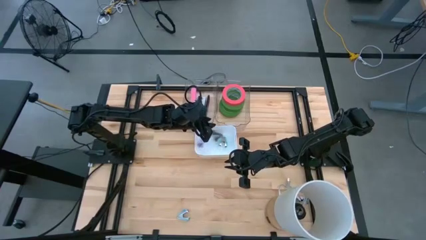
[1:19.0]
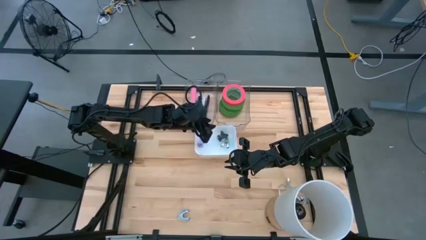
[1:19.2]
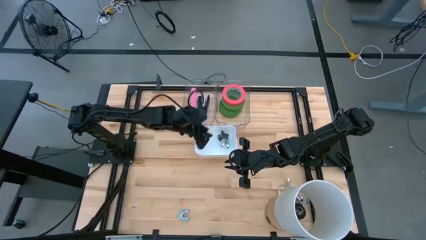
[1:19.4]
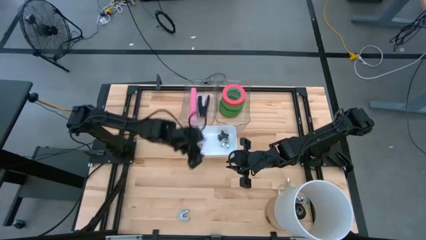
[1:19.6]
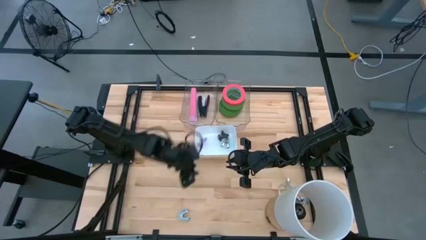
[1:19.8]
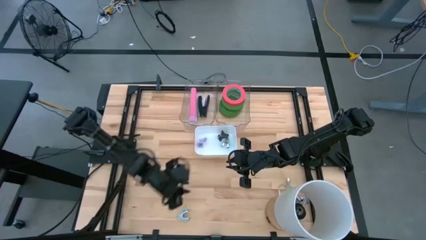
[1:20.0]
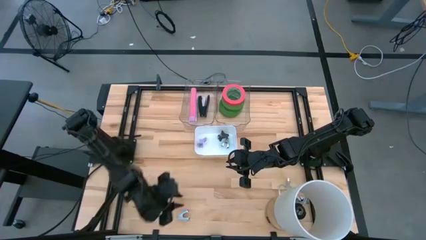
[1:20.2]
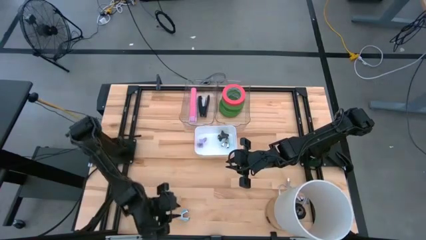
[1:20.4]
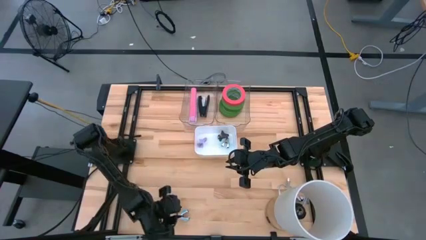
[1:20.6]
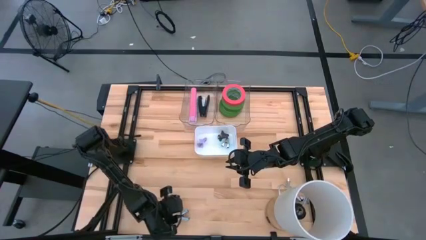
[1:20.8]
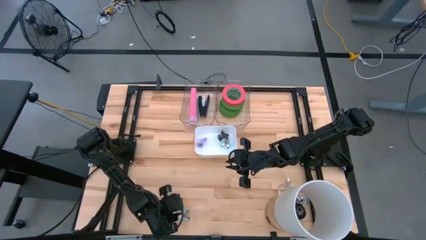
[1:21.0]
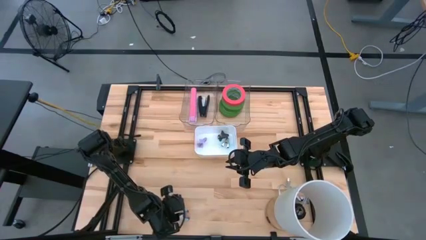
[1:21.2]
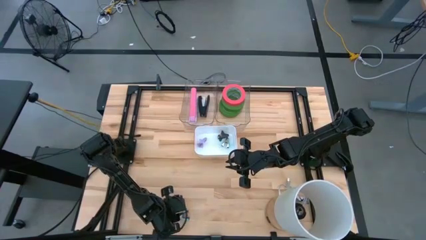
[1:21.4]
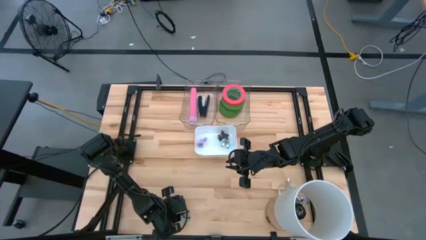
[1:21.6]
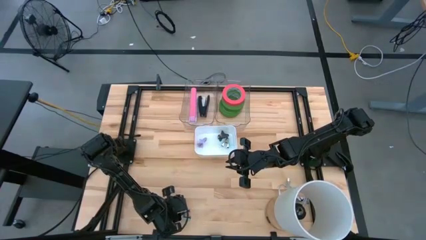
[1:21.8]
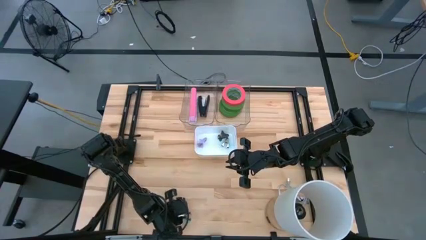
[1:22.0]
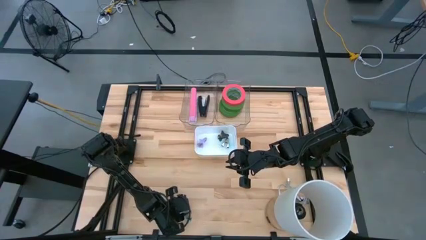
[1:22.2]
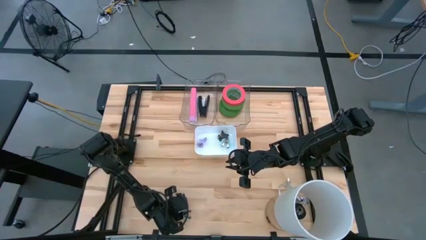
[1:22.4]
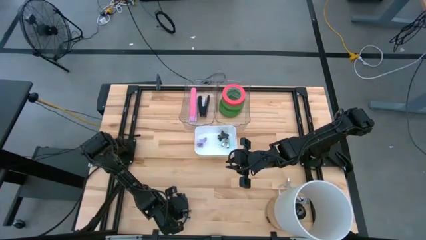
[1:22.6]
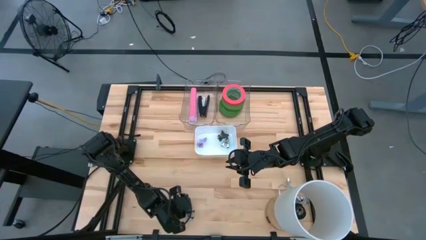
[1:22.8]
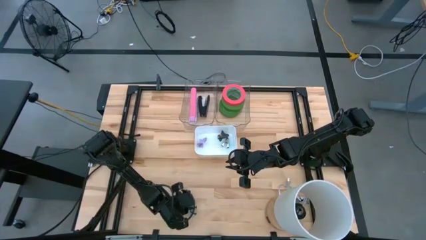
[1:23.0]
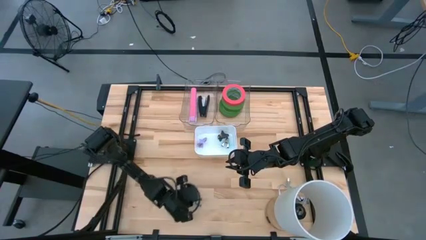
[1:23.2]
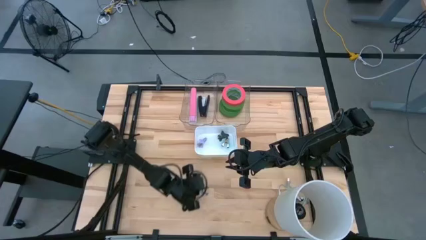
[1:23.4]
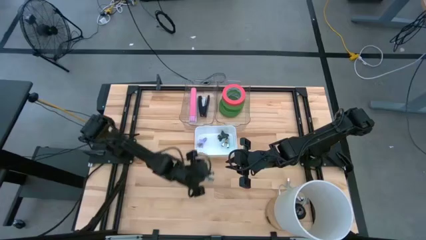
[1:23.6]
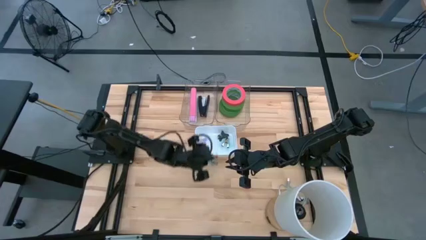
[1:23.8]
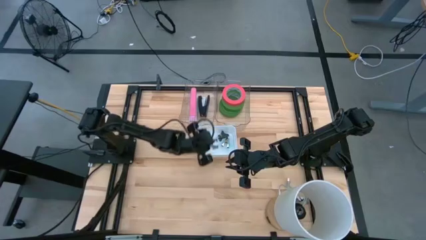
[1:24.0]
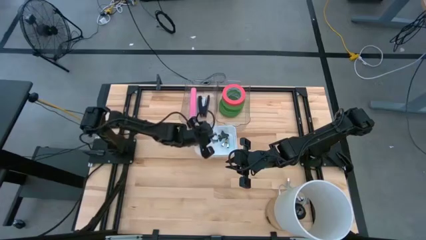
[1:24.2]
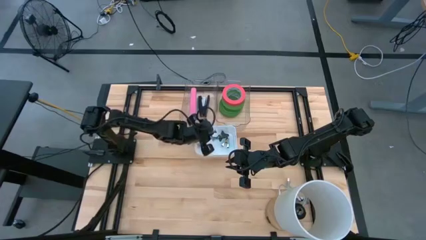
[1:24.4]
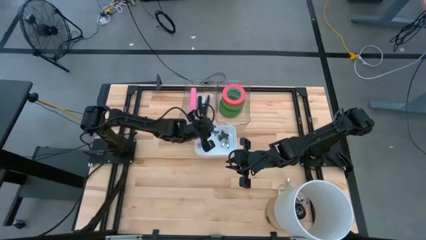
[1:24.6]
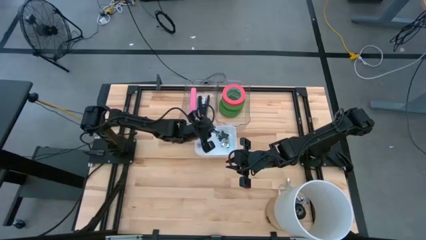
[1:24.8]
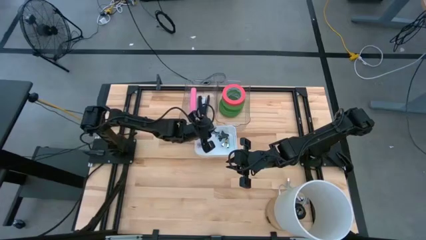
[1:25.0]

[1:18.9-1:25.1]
Task: Pick and place Stapler, Stapler remover, tape
Put the blue staple remover into the white bin

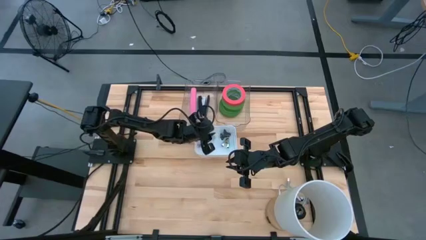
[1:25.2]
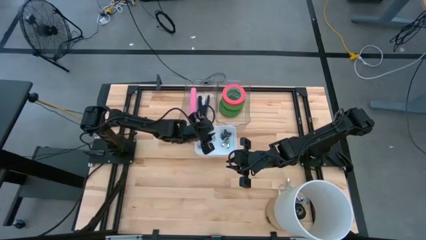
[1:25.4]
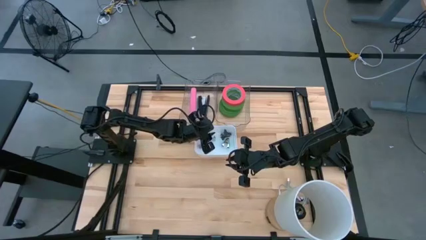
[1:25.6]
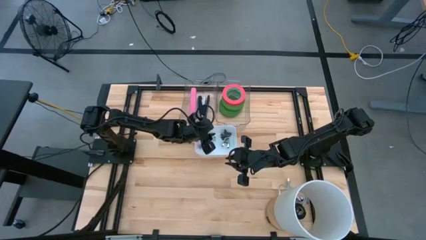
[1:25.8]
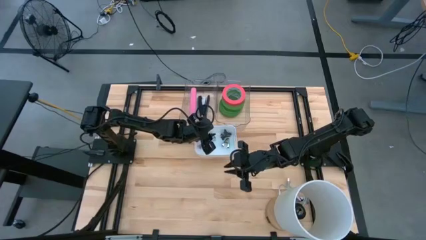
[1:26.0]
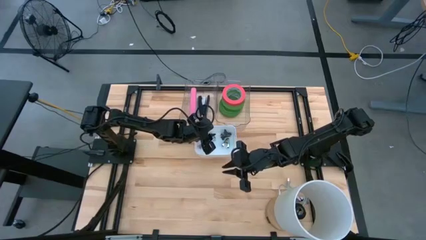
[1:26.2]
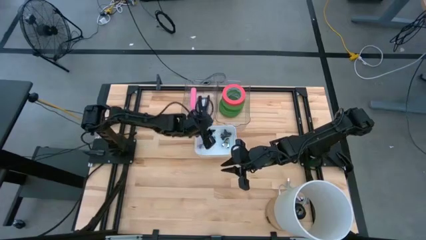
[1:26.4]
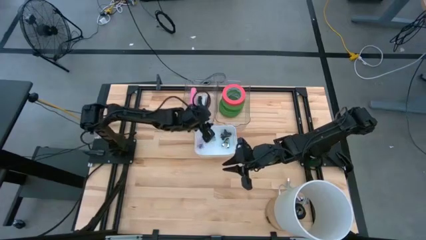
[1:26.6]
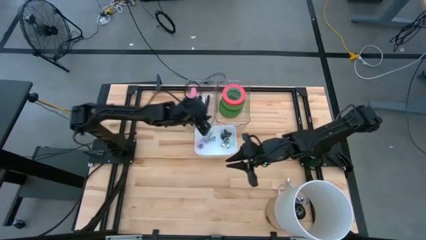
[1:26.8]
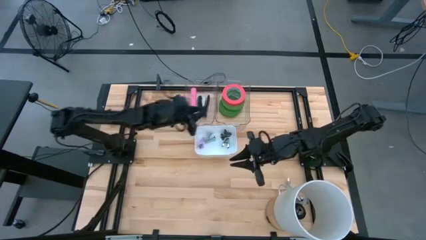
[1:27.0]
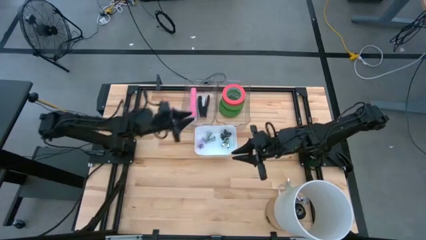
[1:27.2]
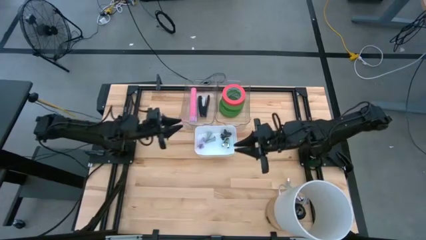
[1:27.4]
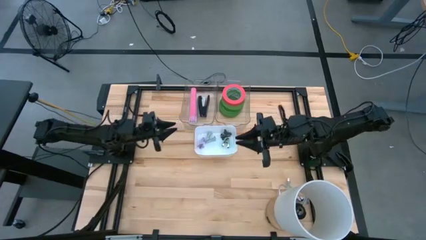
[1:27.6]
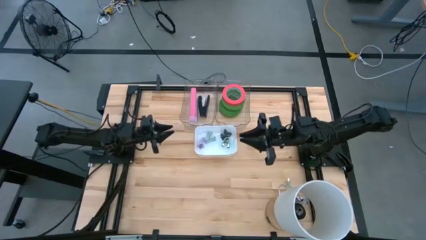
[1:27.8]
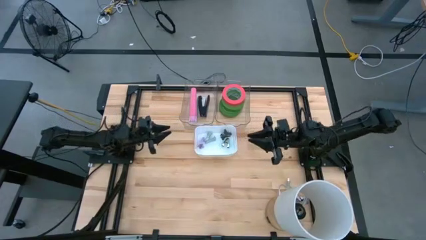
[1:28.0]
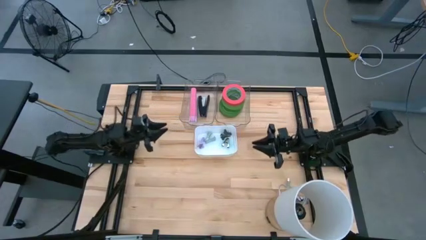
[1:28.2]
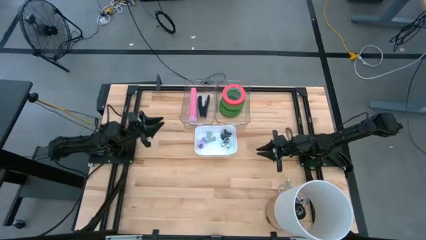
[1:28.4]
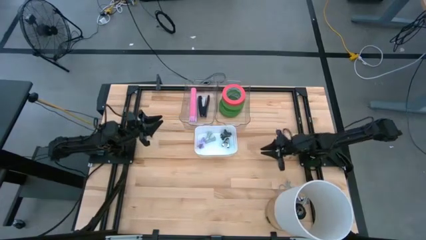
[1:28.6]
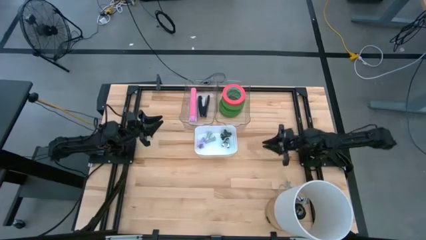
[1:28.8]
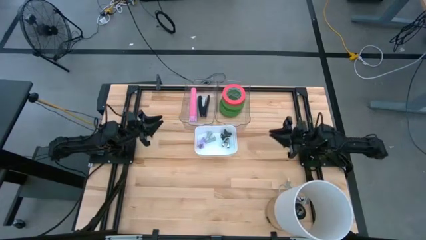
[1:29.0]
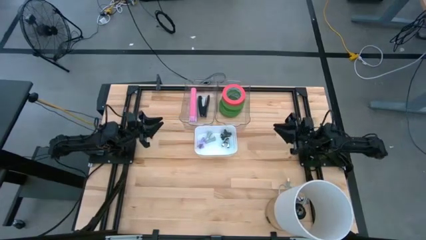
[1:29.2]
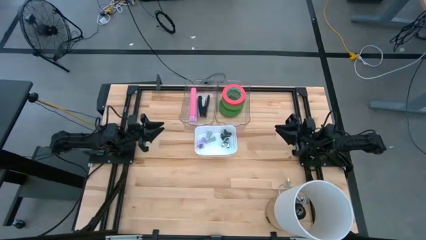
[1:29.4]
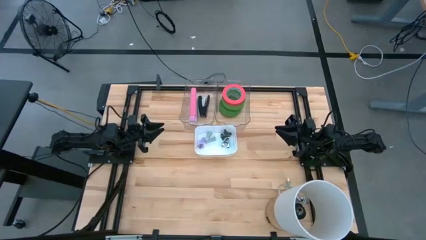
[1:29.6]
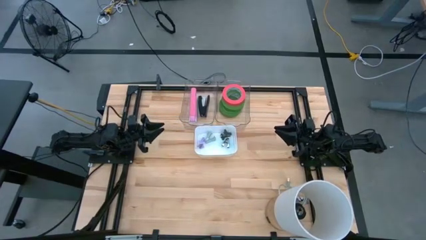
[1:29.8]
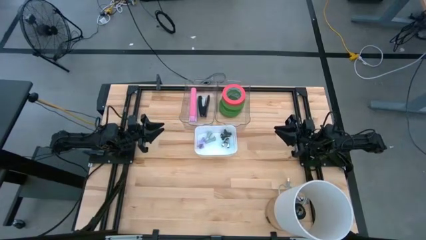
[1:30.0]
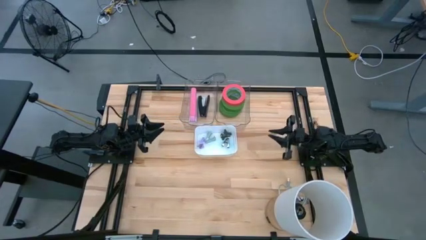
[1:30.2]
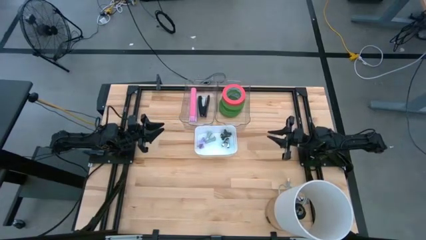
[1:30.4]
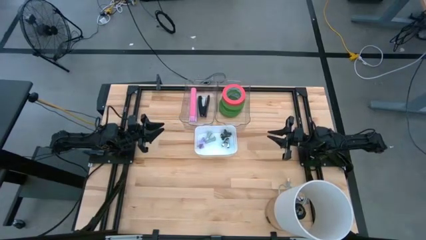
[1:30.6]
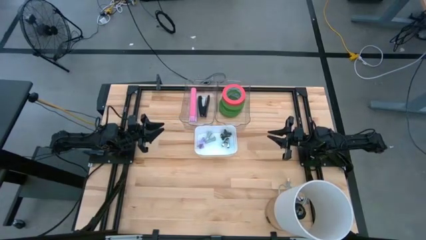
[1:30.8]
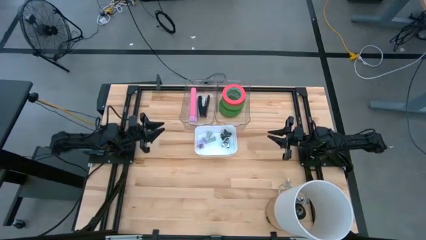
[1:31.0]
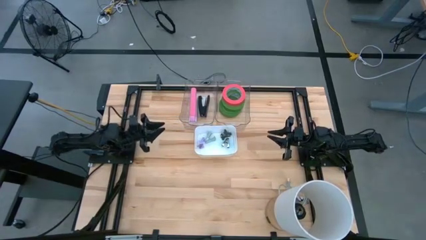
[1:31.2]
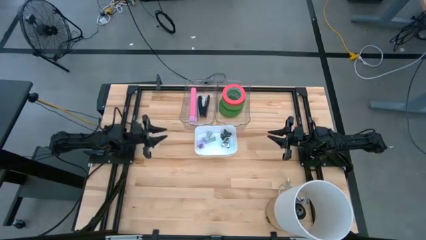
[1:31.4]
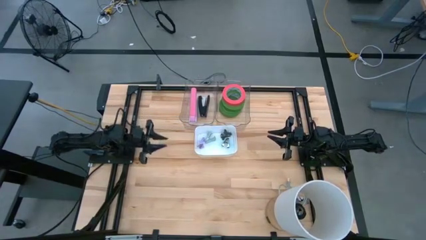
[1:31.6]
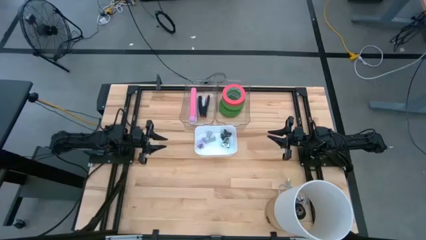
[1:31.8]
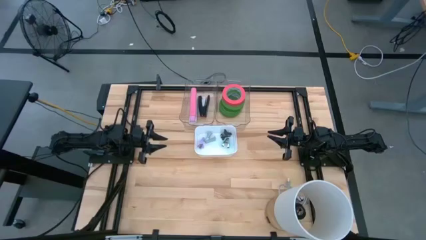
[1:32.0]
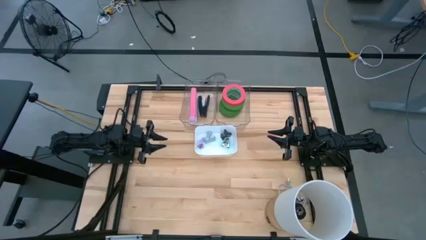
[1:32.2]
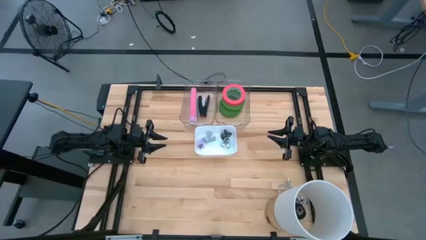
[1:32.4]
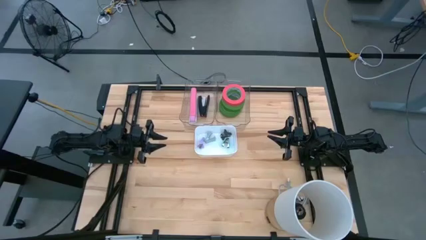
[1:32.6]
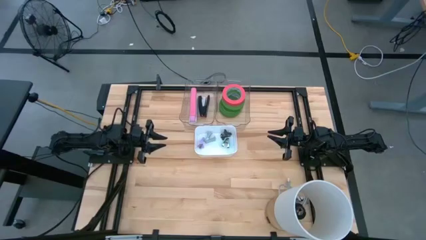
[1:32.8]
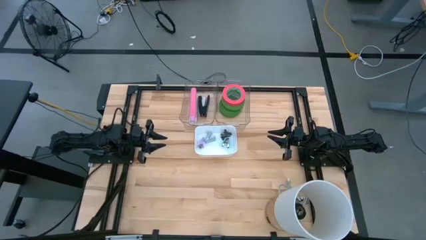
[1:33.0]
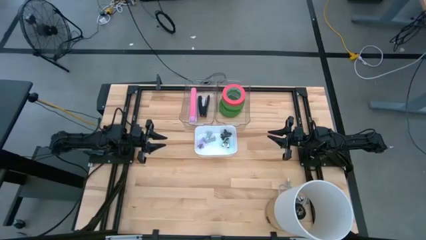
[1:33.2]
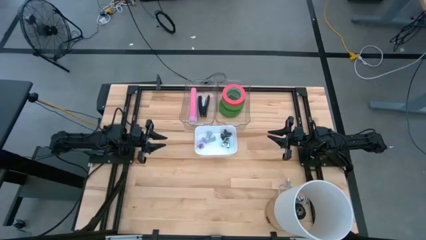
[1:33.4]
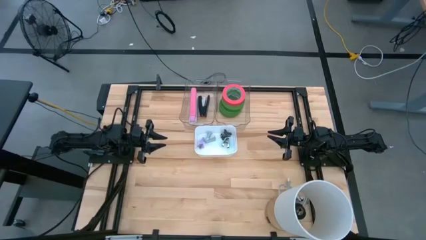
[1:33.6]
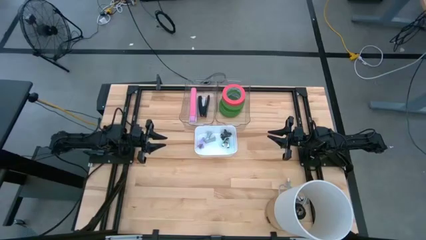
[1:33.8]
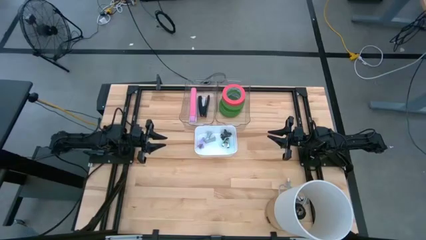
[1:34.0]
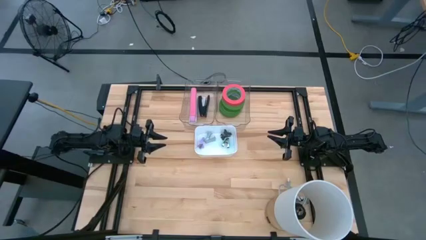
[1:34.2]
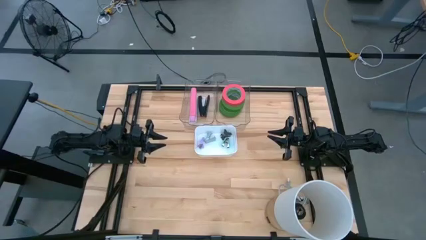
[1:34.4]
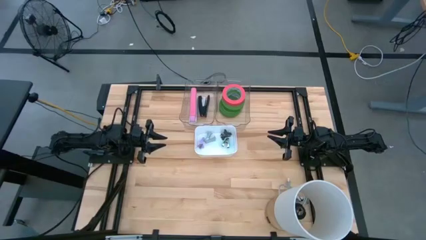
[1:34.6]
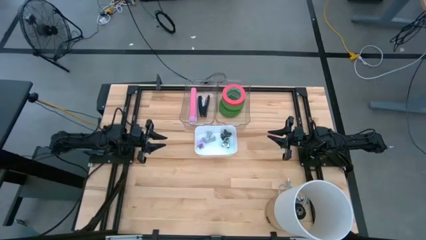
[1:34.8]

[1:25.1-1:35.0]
Return to Home Position

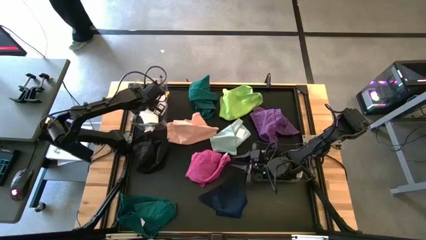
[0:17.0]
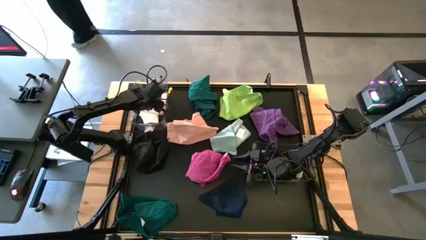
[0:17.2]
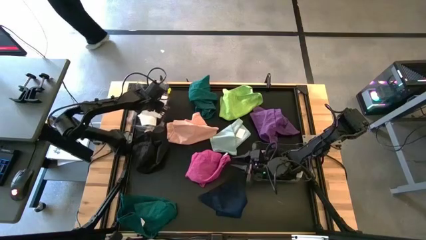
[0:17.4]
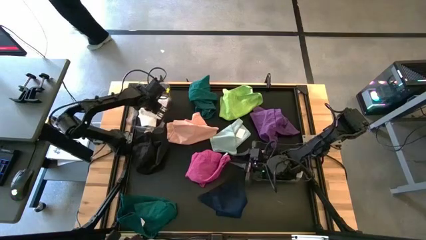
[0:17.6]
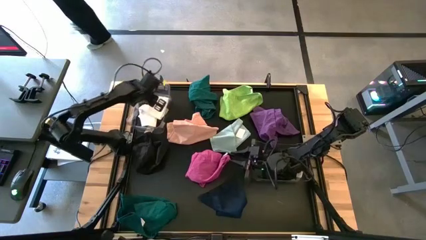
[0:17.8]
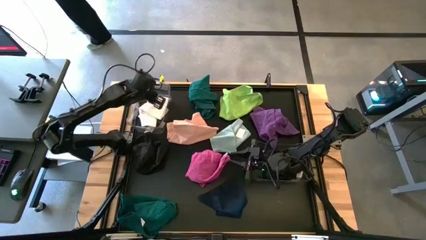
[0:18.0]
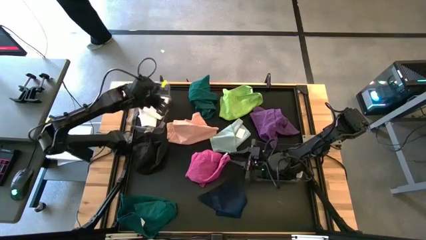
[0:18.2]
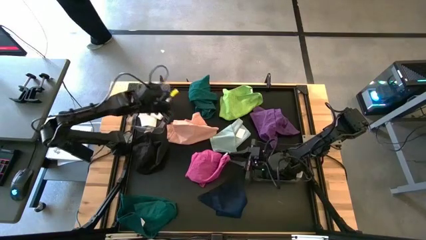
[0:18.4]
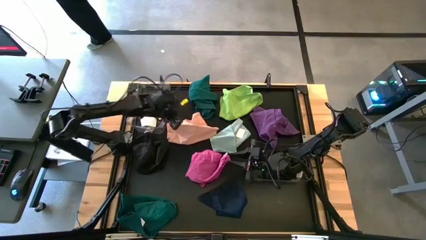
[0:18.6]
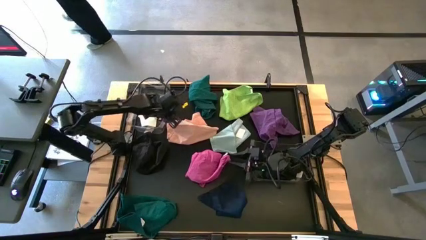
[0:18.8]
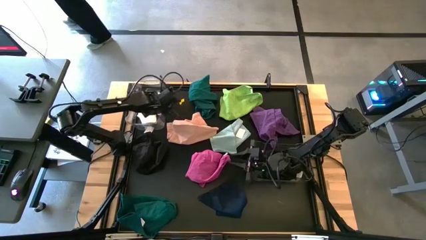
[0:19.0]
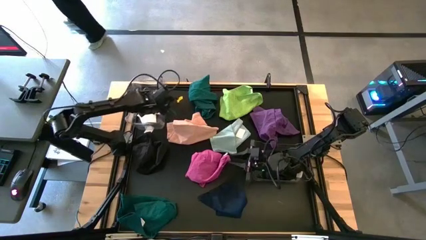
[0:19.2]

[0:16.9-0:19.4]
Task: Sort towels by color in basket
Adjust the left transparent bin
